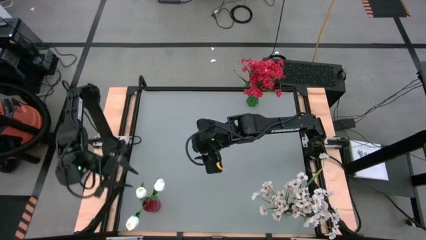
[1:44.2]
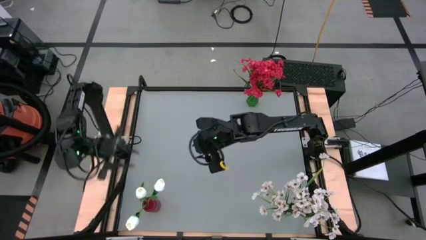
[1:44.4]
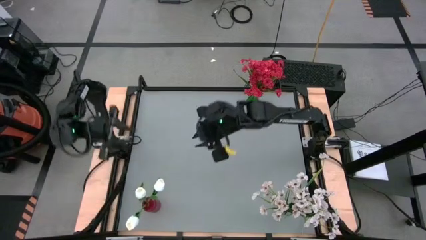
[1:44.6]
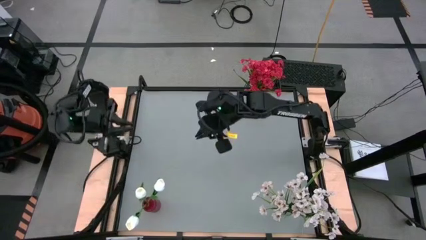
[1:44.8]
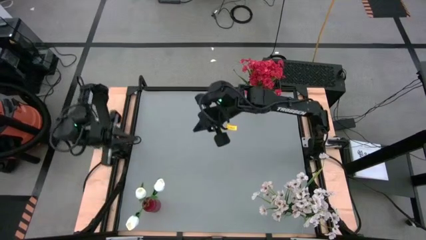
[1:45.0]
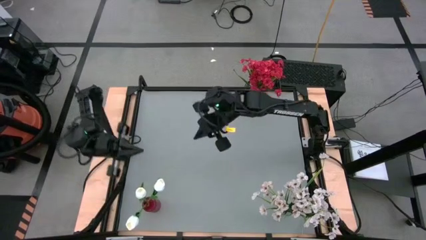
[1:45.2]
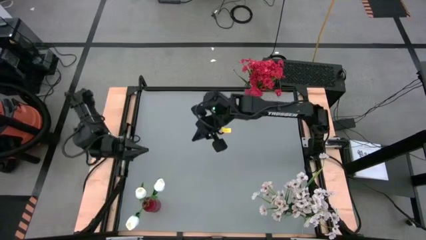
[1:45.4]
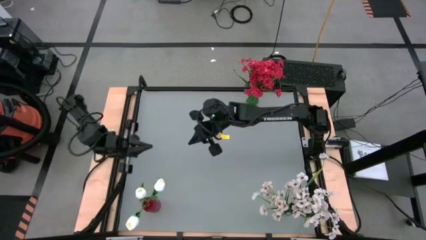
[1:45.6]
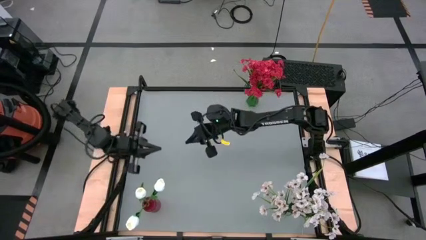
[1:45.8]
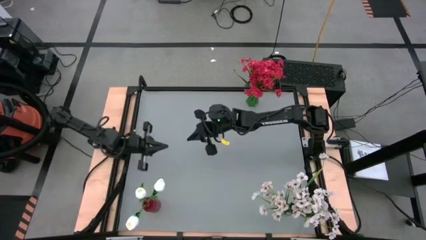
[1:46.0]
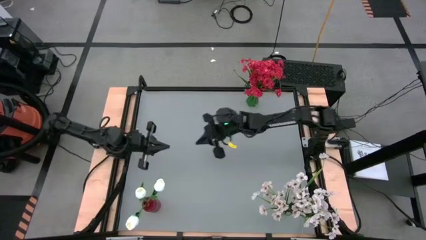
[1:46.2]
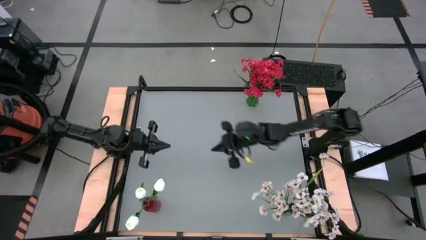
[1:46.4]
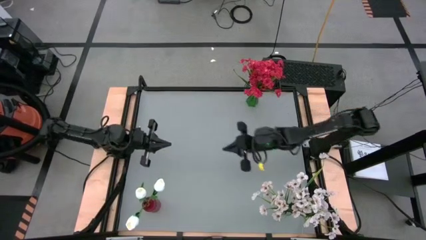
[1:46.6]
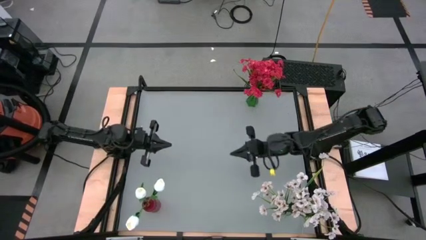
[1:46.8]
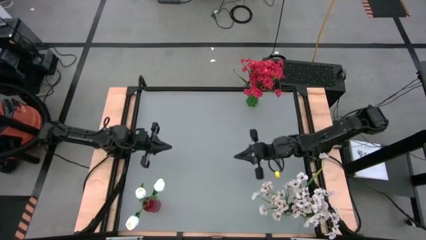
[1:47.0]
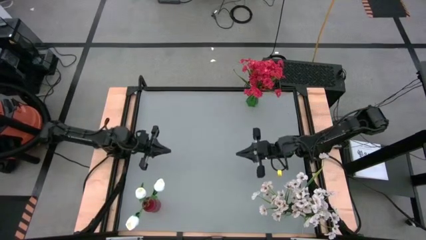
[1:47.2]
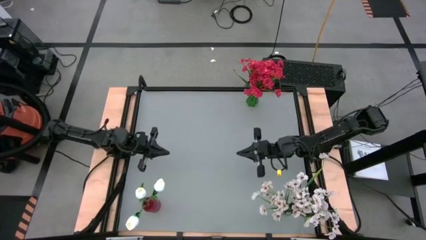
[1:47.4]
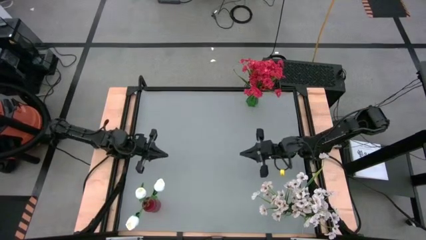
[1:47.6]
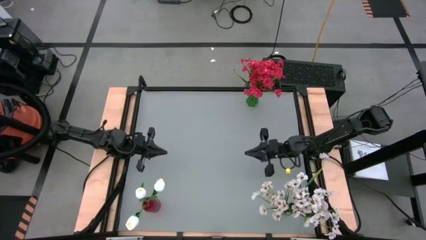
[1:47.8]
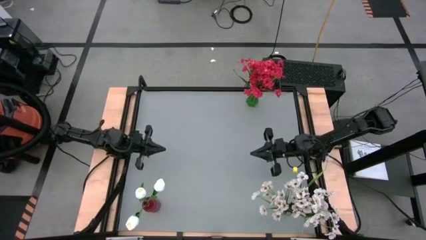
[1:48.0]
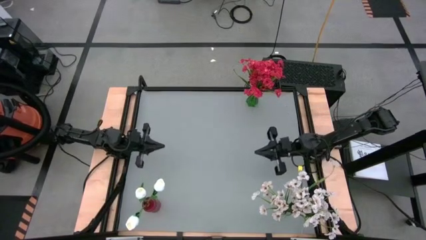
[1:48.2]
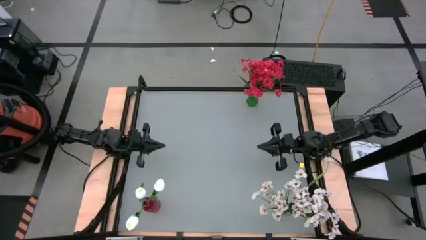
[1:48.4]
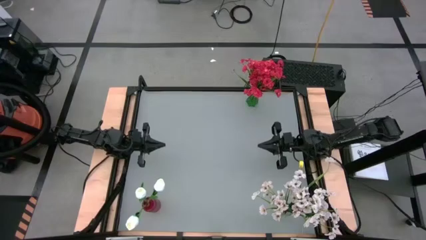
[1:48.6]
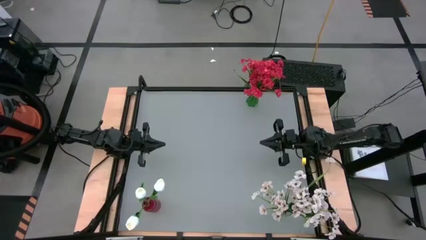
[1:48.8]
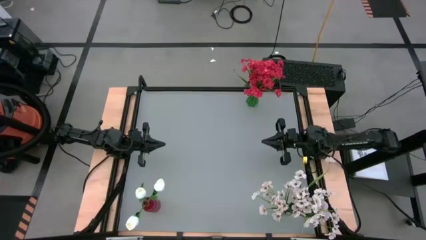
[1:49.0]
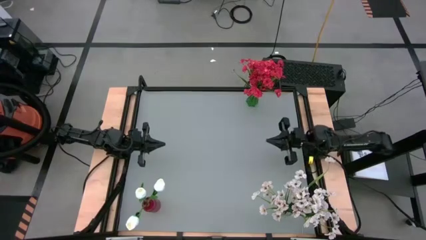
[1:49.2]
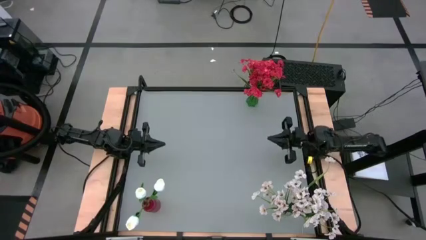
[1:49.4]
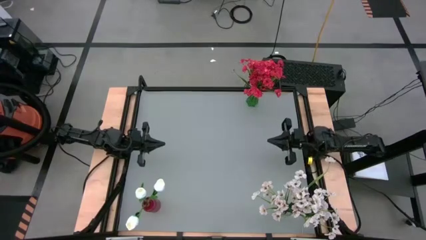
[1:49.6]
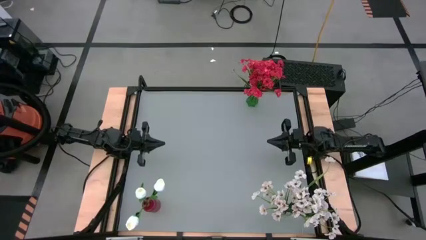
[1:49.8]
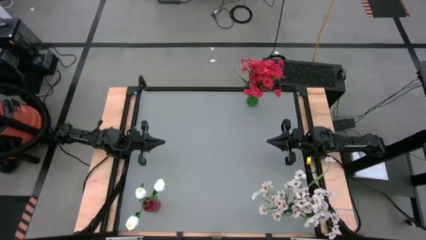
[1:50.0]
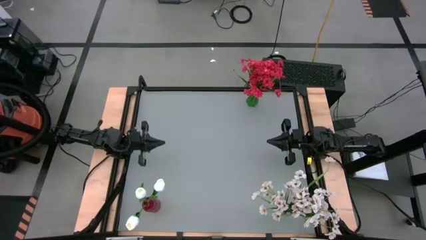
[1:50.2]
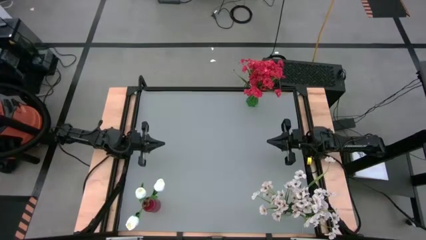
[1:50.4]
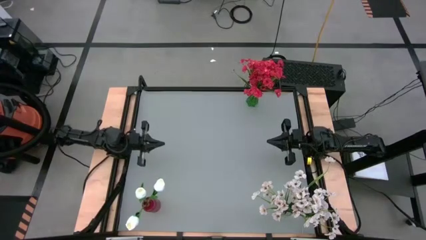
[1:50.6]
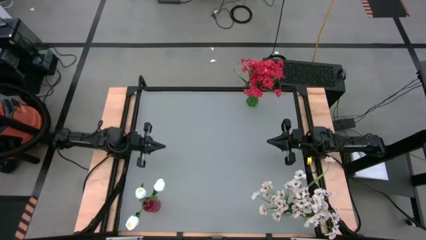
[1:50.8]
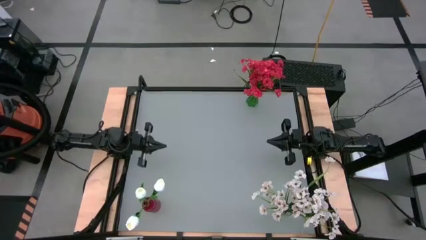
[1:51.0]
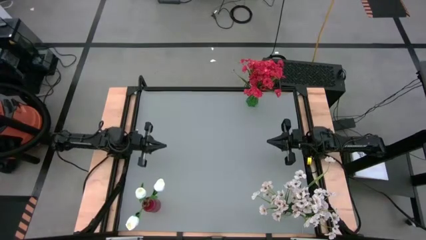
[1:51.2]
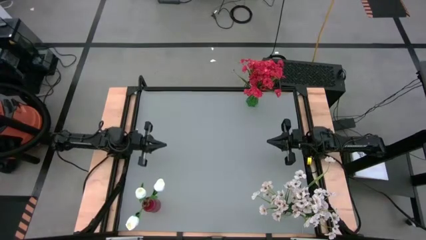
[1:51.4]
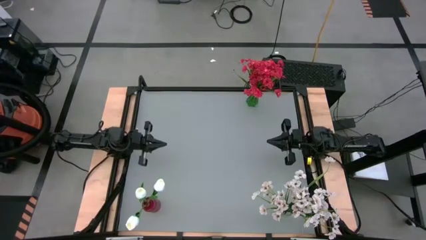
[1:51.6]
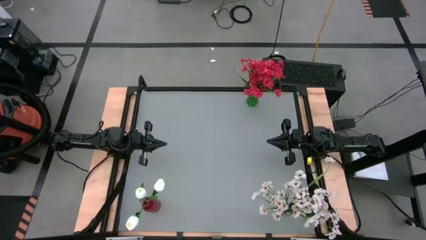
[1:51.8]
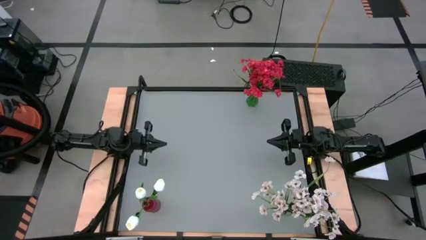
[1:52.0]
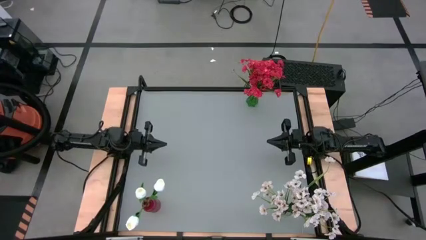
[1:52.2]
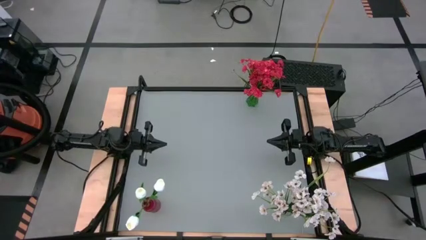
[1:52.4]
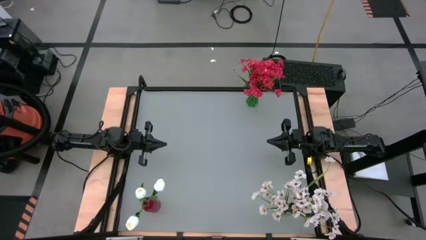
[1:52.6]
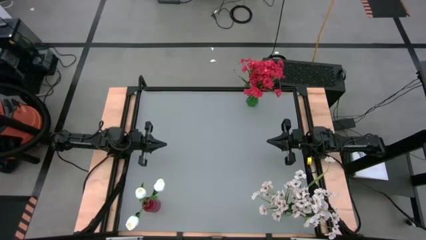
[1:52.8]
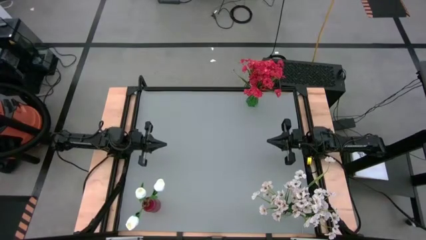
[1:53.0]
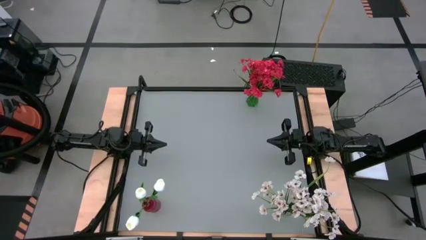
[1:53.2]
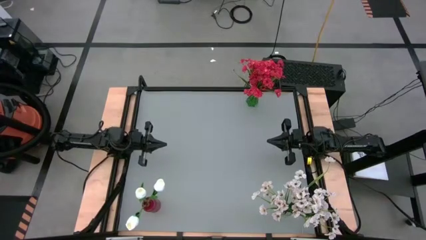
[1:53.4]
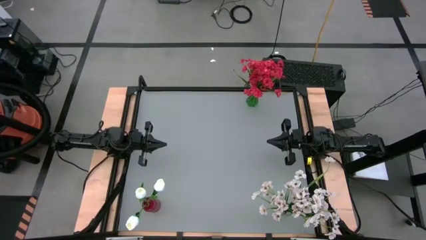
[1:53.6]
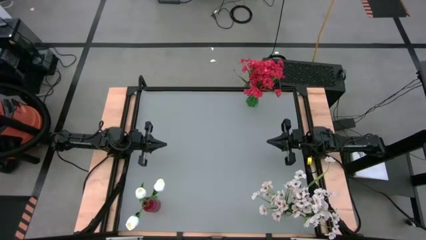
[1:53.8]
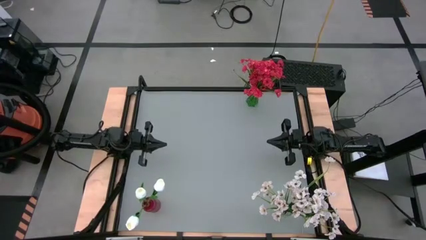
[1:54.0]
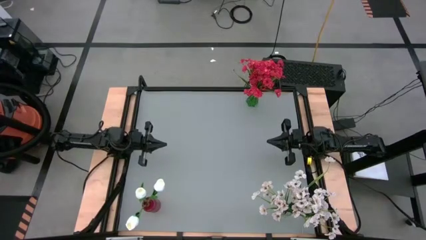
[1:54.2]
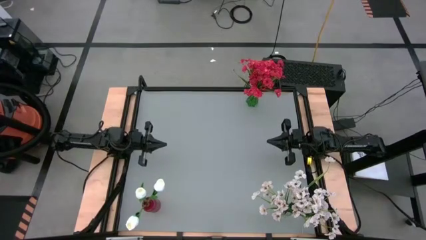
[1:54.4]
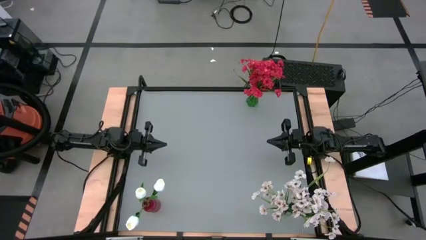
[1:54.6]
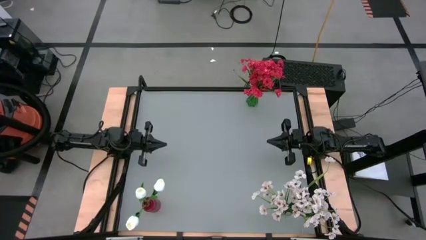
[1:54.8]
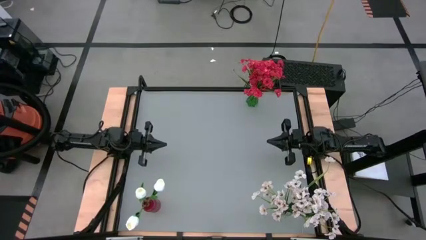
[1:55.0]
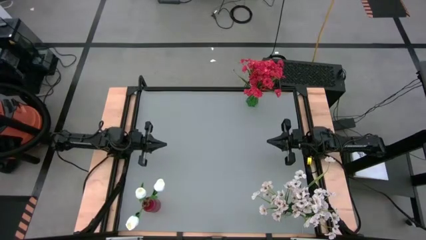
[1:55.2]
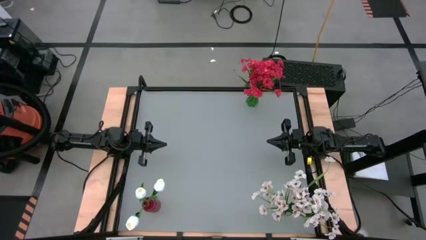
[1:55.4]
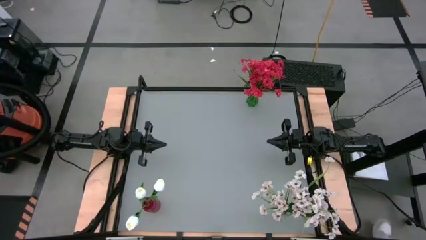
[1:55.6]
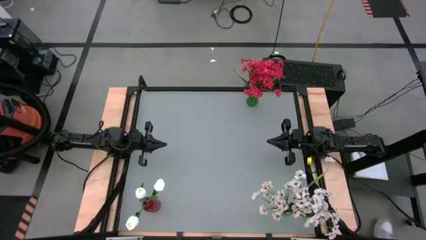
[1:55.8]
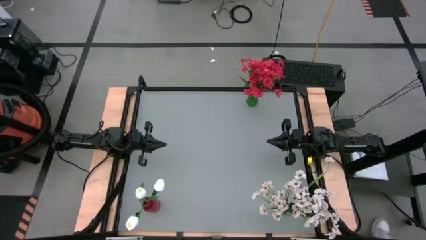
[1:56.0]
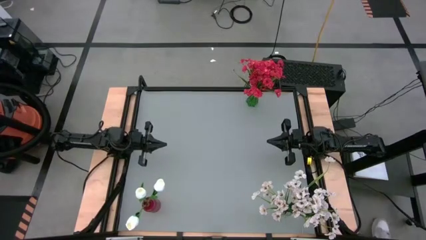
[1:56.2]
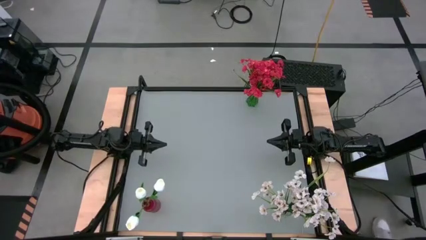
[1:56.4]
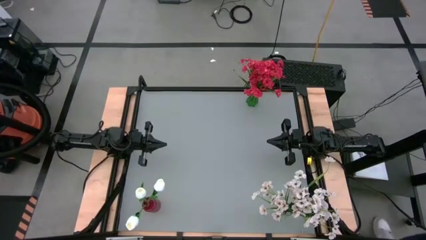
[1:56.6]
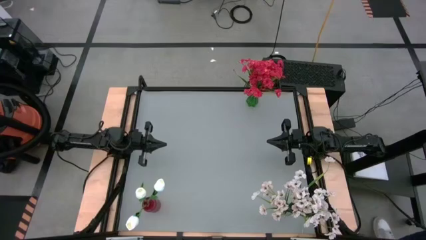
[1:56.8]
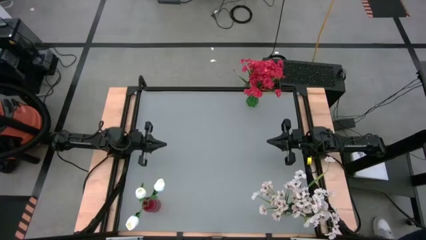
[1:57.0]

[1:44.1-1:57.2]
Task: Sort flowers into vase by color
Return to Home Position

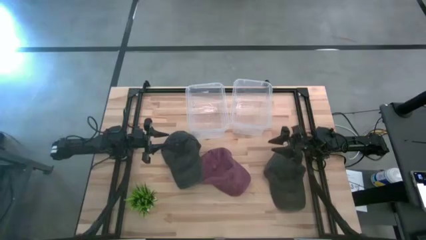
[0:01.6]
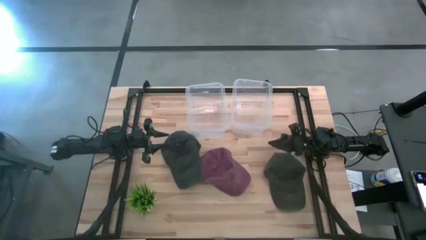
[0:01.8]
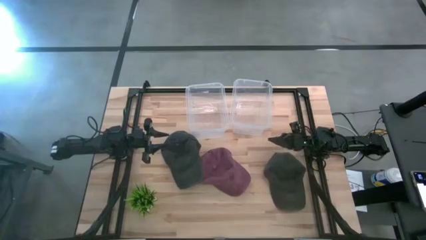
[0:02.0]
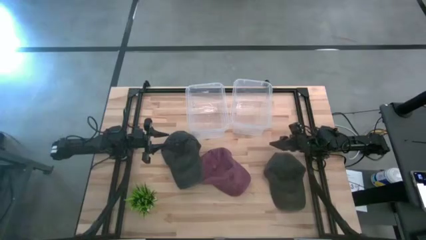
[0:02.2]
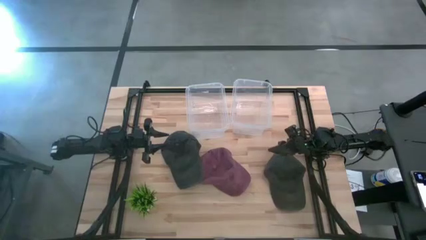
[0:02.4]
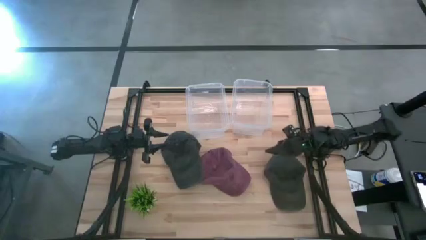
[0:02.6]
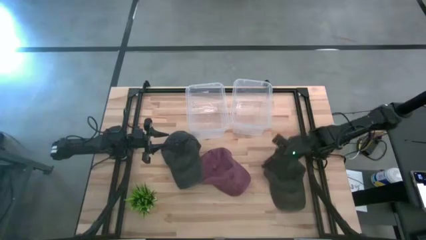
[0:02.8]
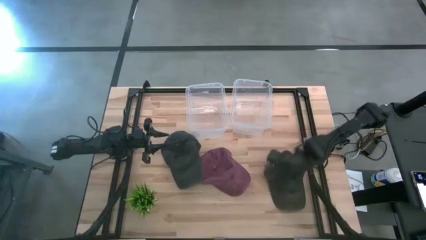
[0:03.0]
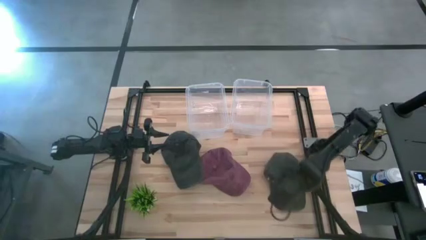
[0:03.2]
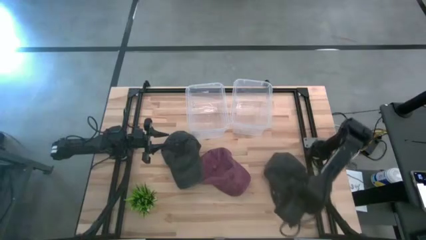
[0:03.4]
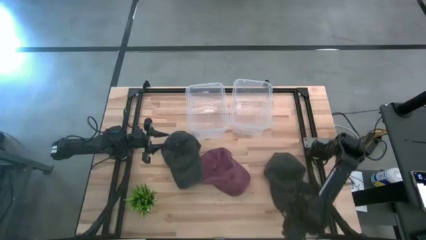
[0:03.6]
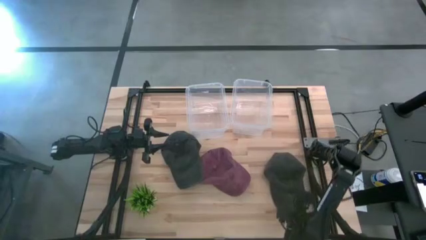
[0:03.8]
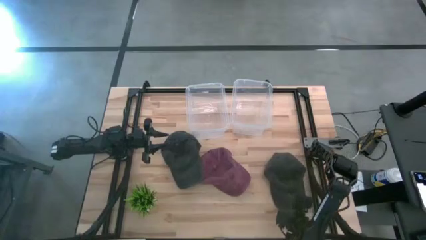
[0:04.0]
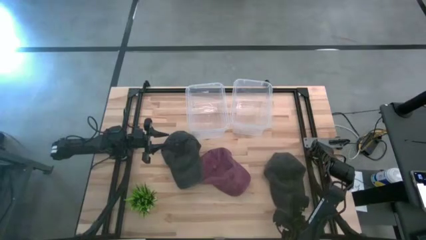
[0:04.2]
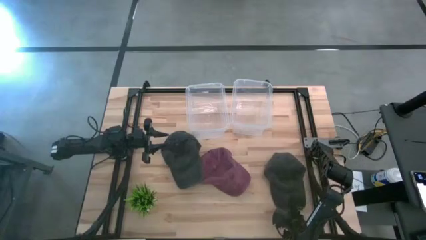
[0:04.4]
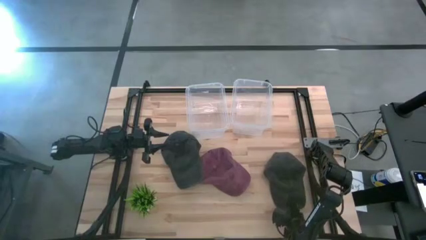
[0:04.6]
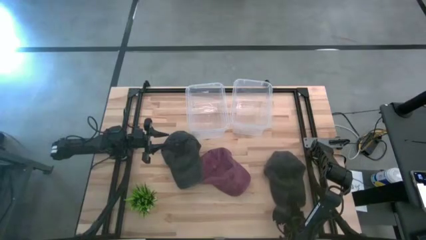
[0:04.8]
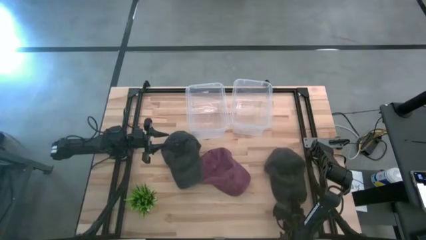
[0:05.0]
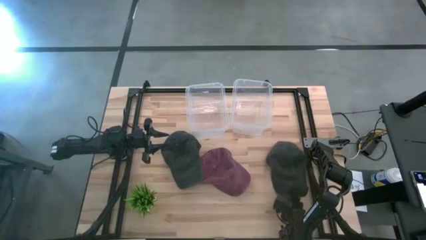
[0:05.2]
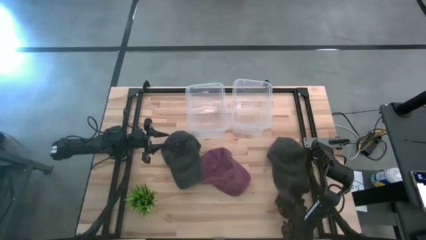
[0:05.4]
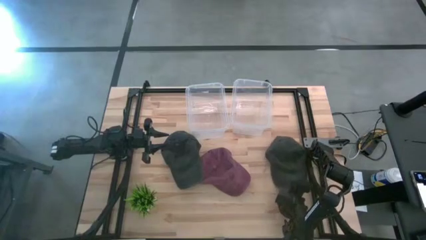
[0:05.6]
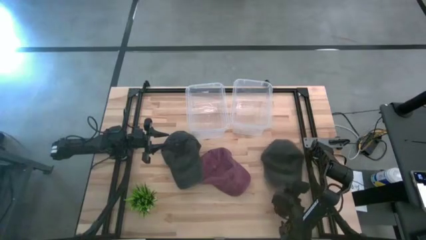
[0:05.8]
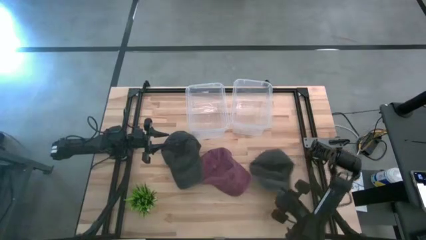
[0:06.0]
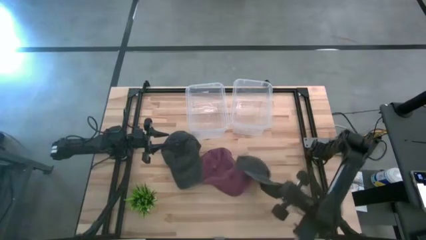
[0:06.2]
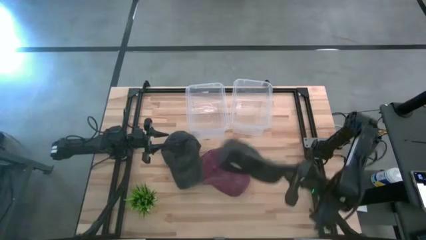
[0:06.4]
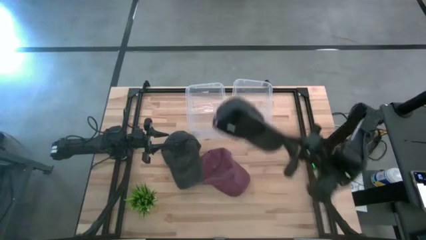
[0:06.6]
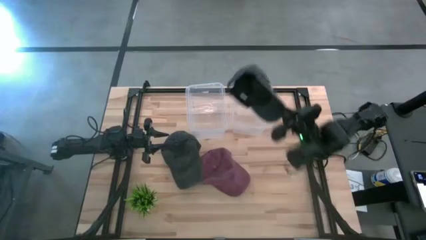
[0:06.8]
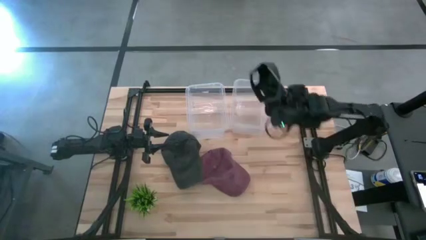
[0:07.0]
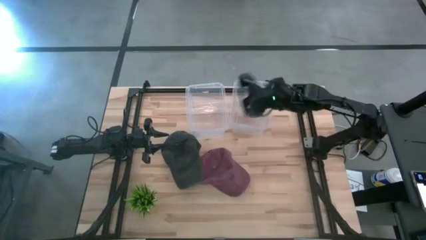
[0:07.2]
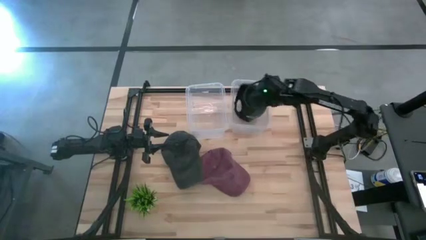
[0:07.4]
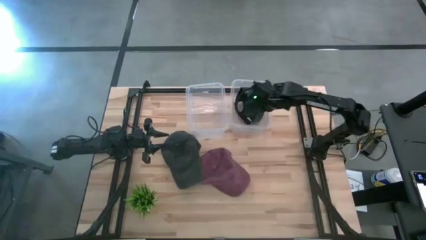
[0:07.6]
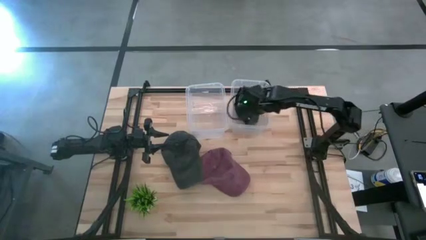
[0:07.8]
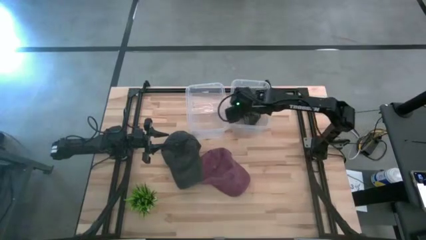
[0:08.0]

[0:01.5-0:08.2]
Task: Pick & Place hat
Put the right black cap into the right transparent bin
